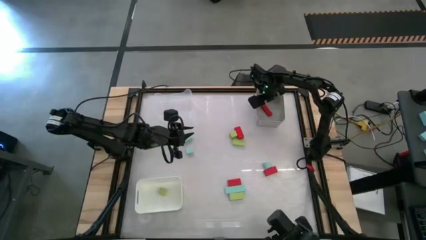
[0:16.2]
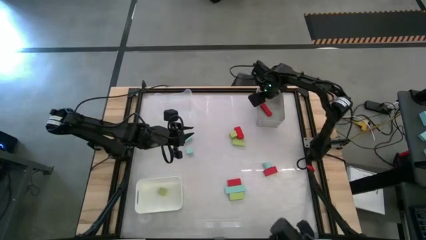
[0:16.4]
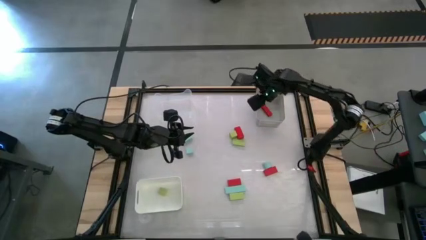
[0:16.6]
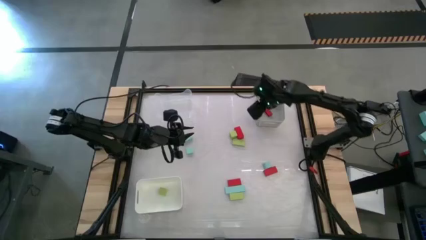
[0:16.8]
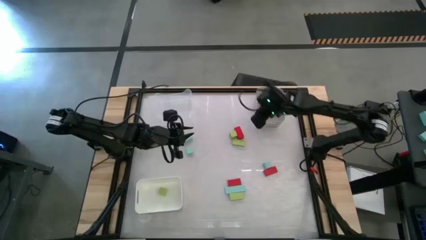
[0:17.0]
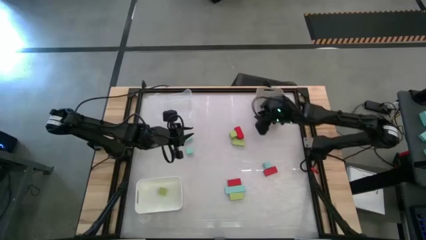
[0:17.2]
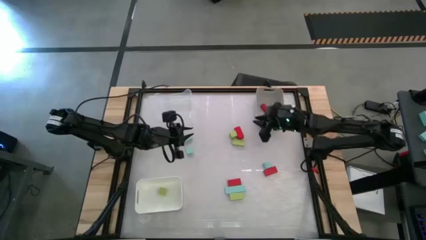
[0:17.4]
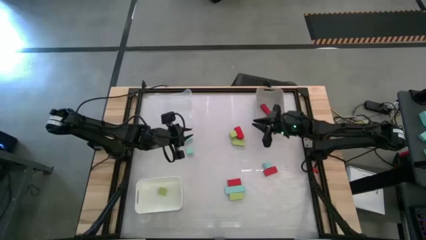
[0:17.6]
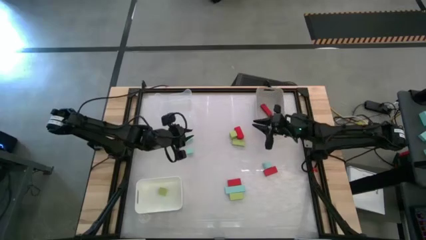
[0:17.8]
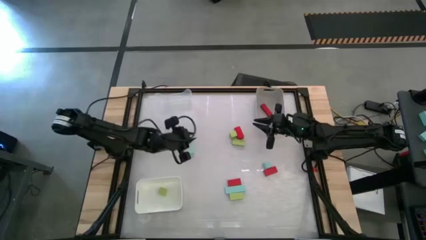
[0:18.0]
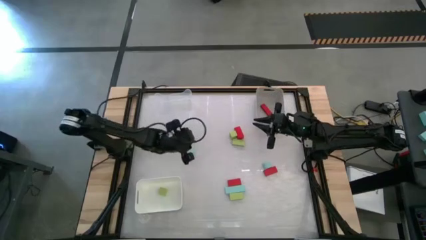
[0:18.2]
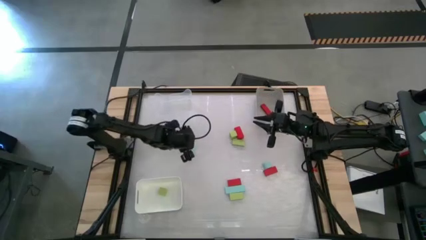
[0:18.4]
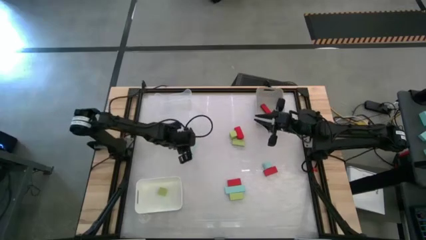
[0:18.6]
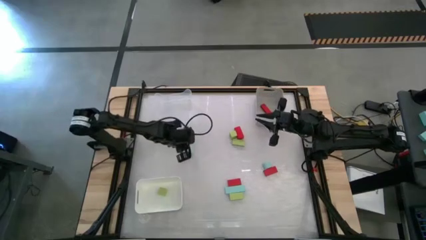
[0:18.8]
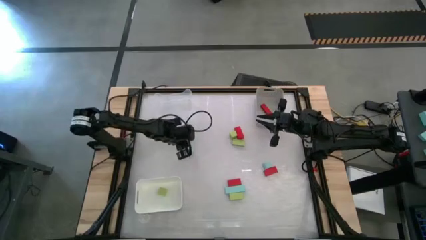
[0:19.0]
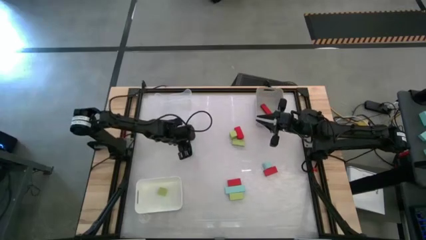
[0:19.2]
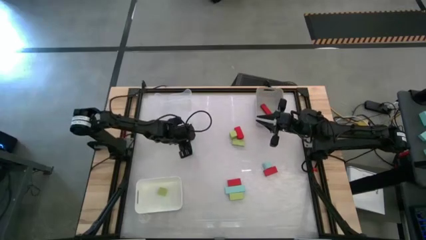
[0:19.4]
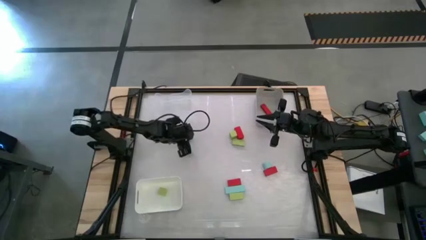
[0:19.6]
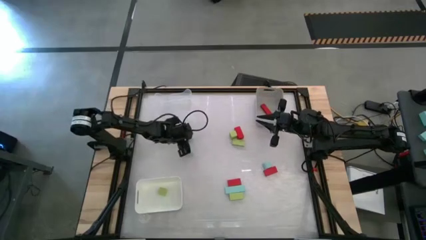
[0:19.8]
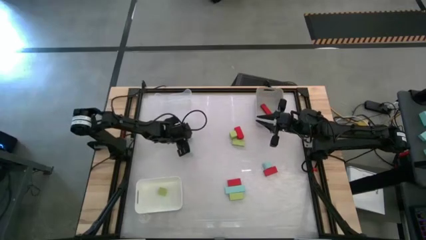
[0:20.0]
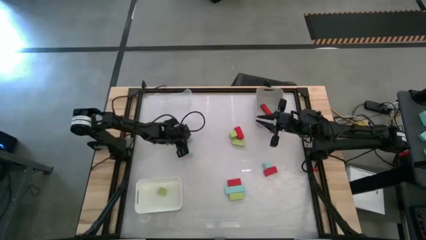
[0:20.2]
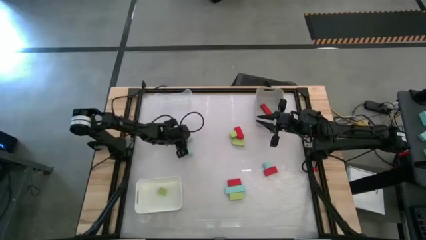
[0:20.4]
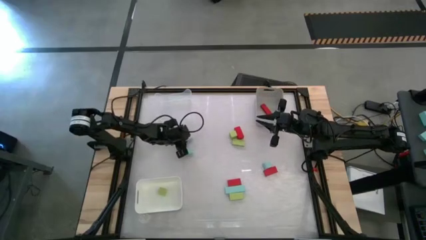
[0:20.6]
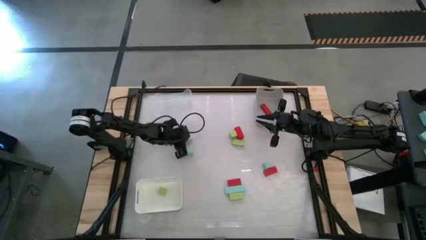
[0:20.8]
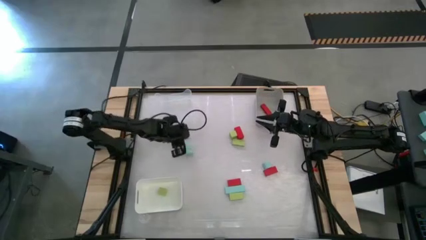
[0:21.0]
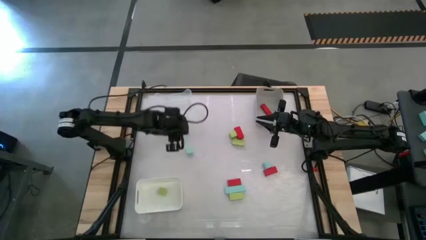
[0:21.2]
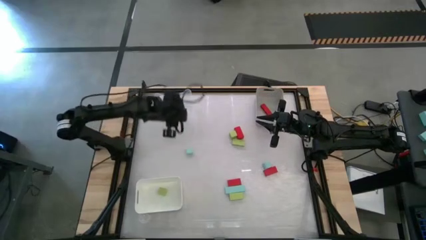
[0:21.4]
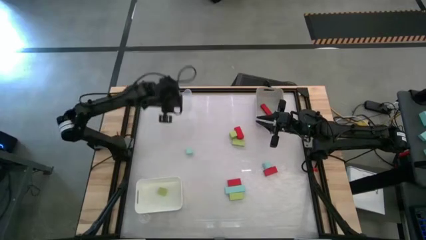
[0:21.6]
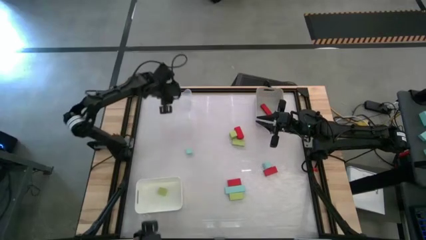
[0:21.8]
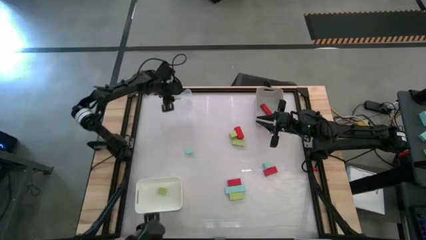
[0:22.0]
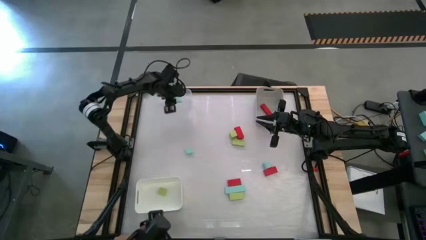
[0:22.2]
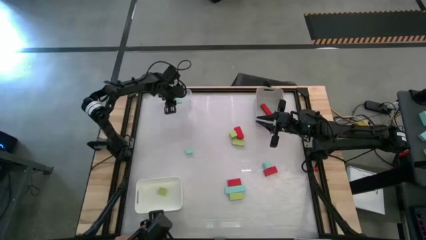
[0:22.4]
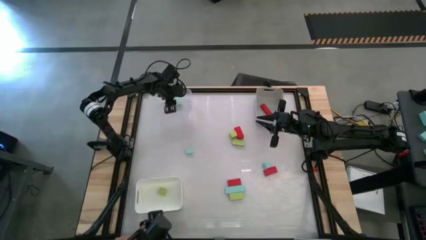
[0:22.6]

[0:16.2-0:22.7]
Task: Sort & place blocks by color
Put the top left blue block into the transparent bin

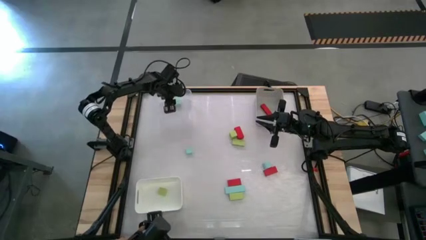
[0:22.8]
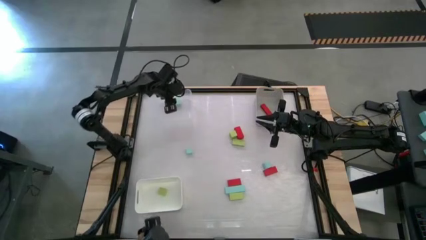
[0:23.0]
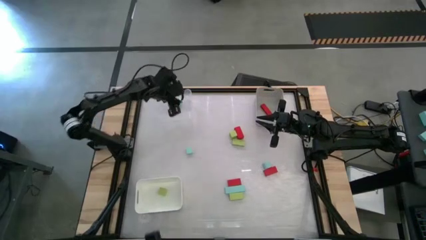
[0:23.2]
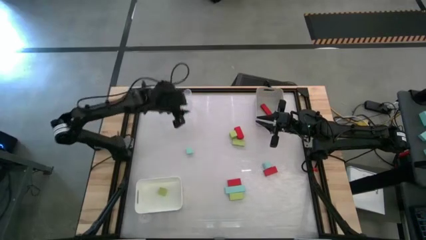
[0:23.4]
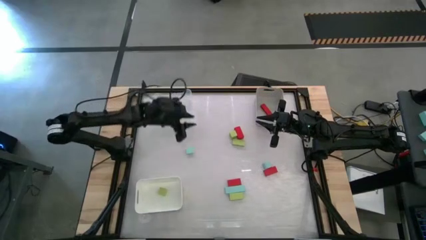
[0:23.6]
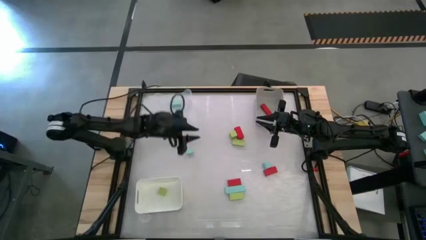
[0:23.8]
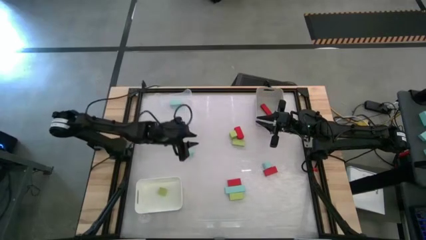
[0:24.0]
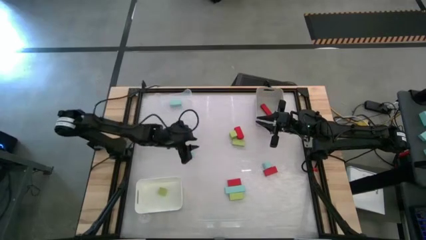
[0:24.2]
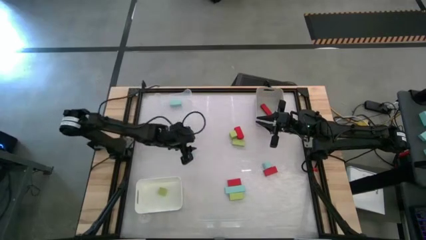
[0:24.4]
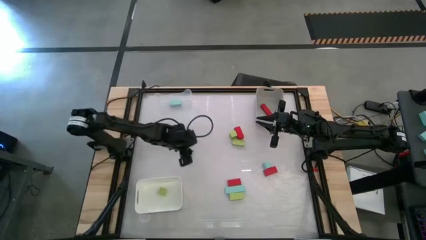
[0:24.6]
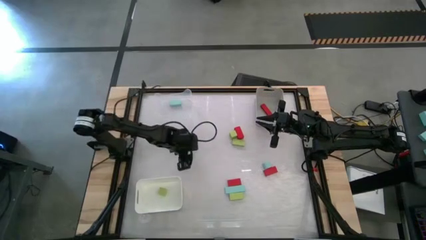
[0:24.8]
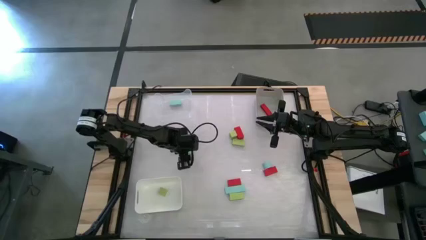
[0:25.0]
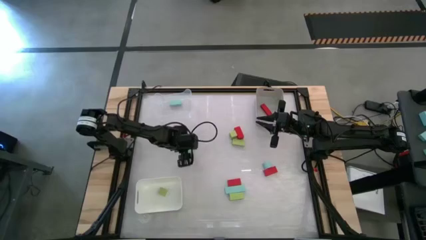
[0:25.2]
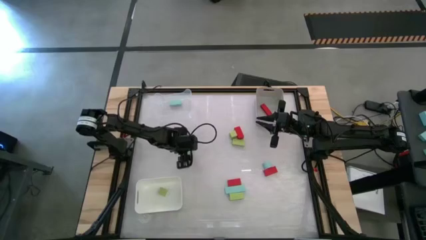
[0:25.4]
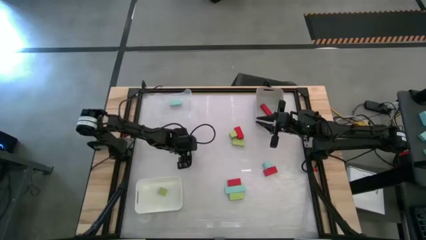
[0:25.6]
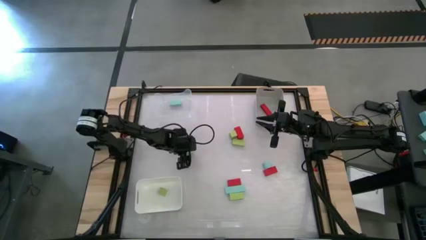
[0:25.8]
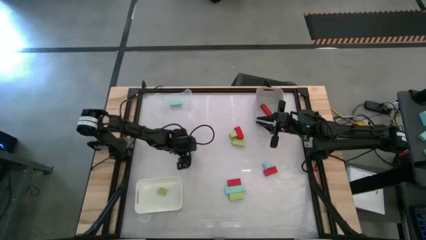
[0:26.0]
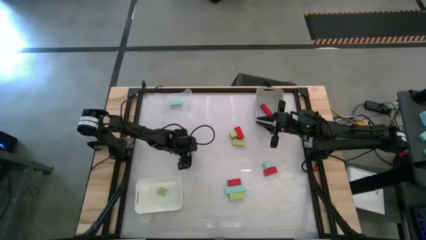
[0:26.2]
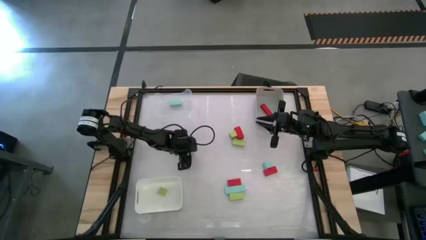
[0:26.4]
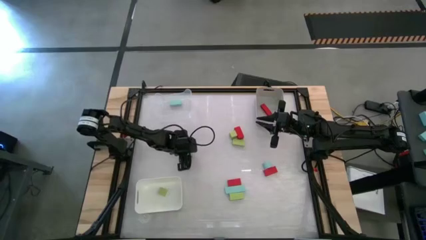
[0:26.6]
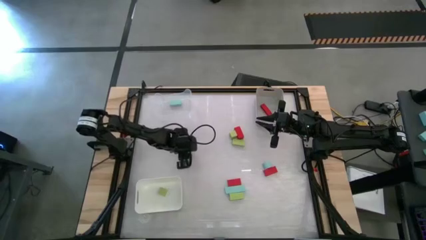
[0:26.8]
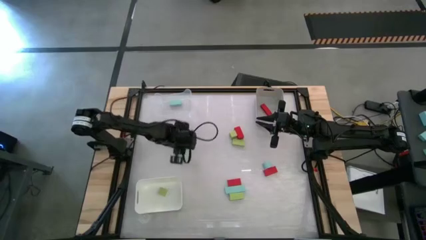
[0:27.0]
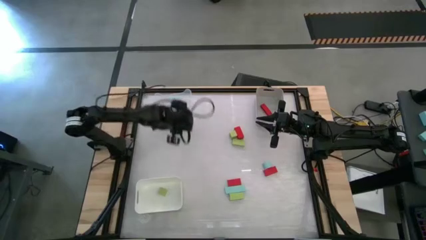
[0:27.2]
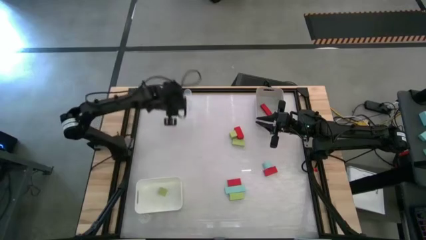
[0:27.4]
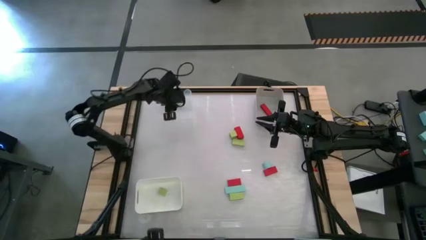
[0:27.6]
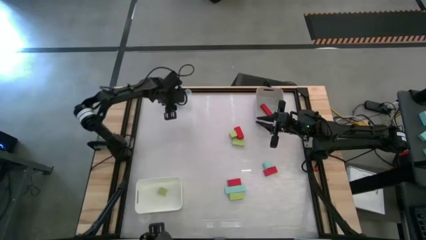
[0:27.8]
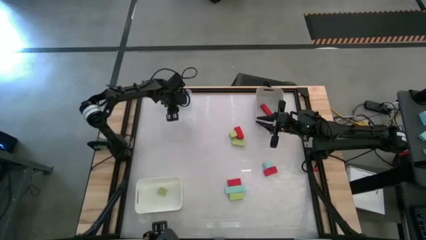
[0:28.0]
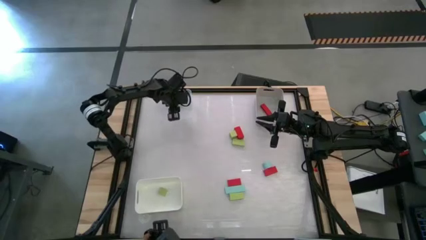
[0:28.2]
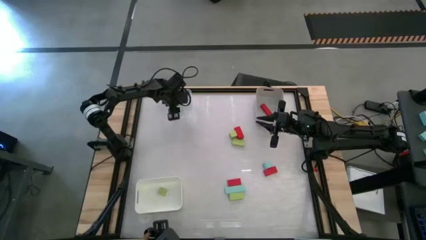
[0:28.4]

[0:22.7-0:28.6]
Put the top blue block into the transparent bin

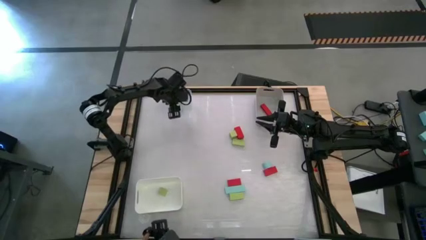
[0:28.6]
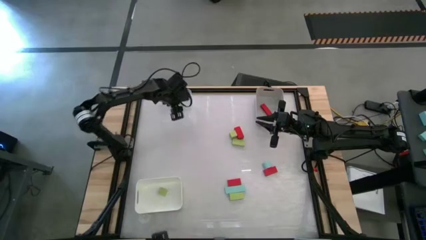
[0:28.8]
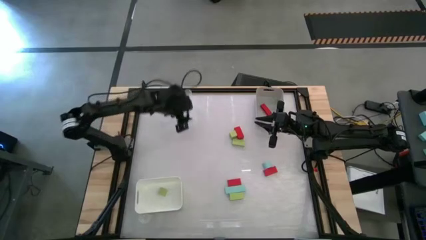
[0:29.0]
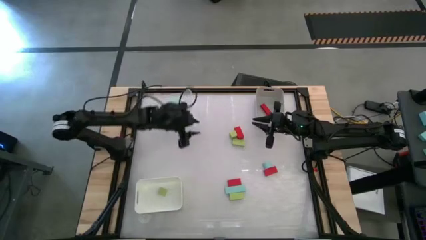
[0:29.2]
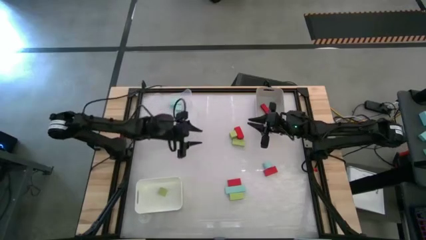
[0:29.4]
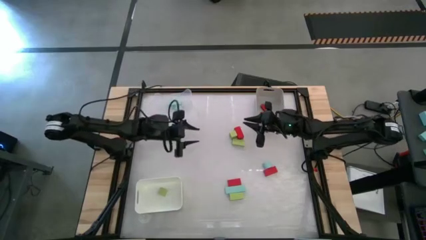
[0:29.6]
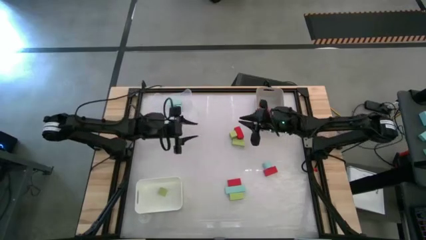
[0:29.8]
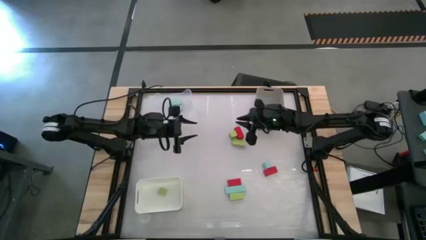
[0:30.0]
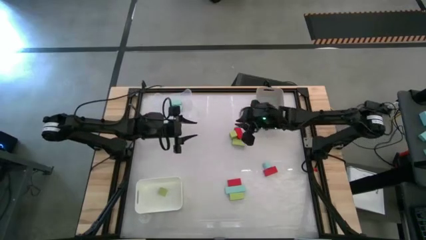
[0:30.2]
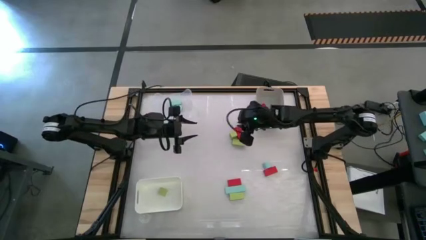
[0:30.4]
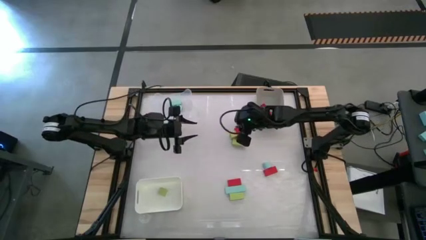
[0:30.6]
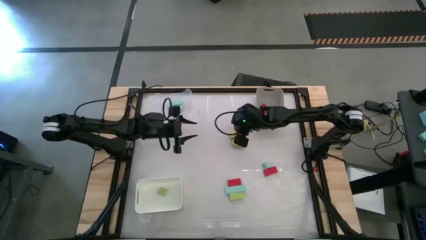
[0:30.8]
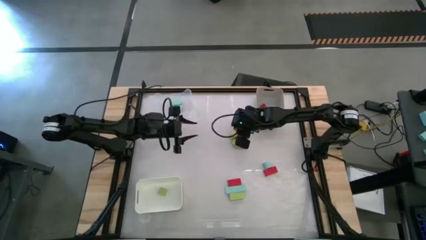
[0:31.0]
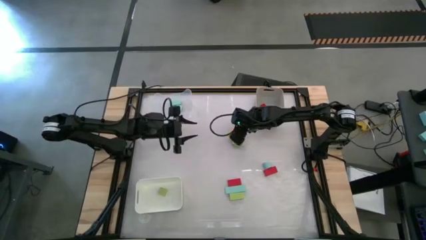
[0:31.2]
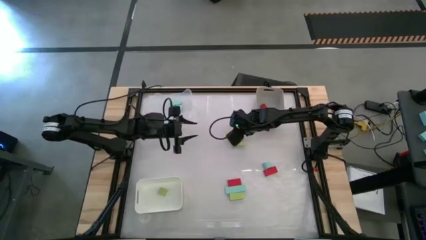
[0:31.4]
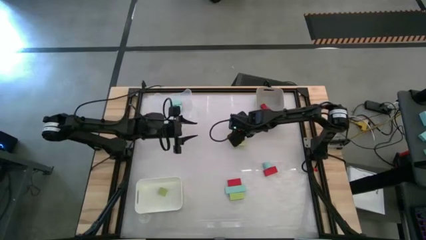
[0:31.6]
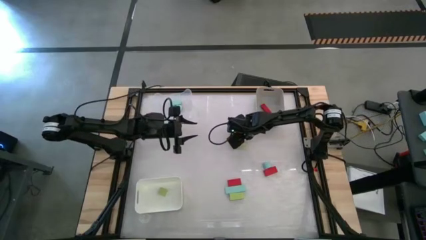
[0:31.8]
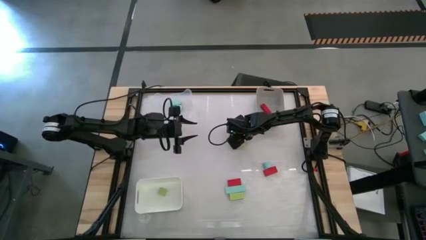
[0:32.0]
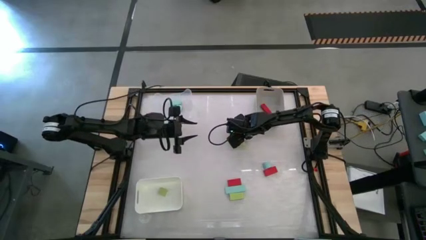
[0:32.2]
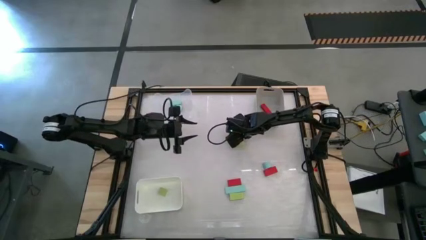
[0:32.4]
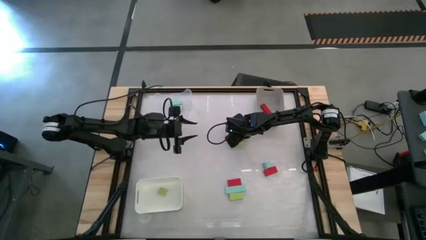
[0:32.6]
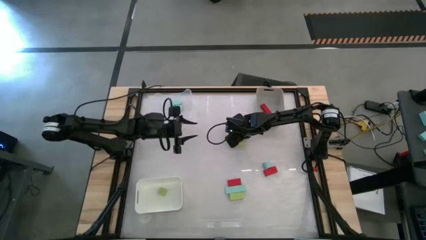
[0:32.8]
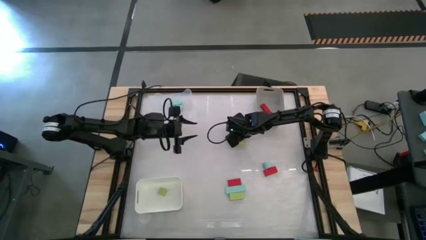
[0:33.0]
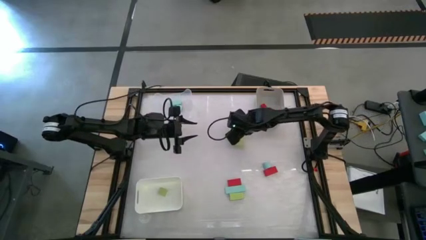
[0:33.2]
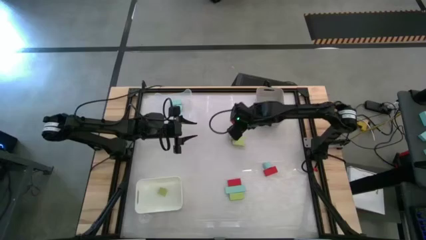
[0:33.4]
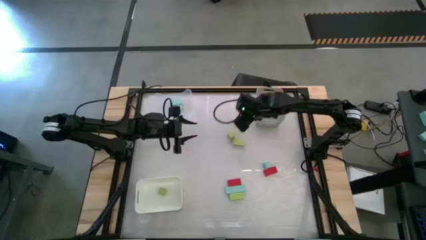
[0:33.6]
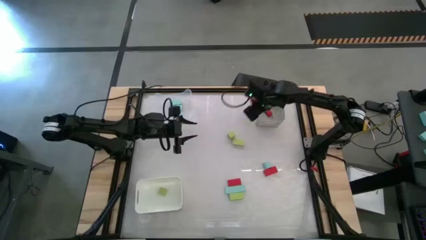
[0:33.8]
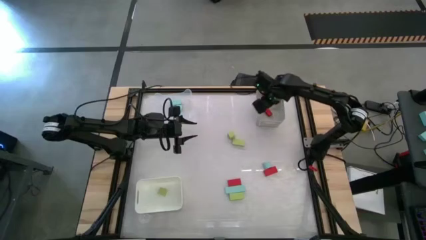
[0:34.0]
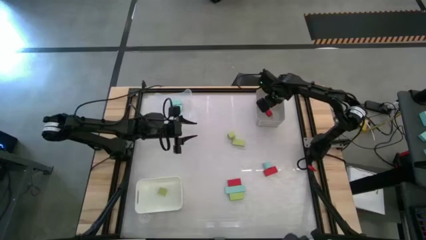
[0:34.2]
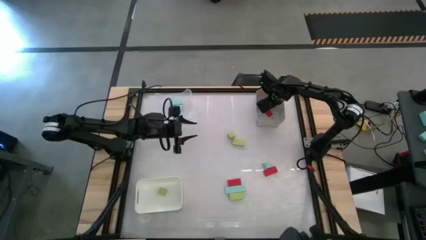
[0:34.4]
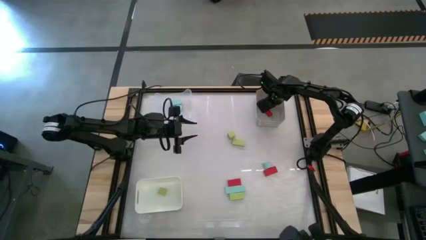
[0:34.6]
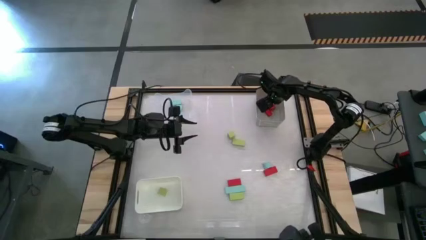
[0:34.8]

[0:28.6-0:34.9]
Put the top red block into the gray bin
